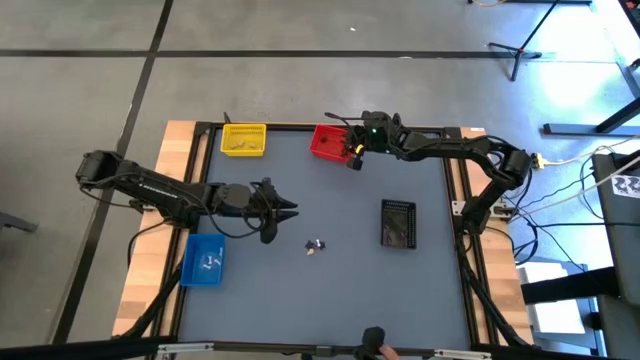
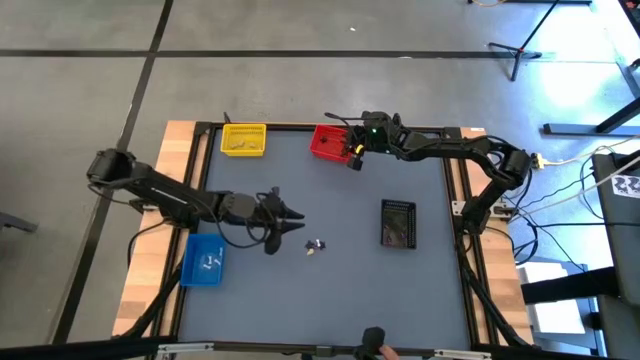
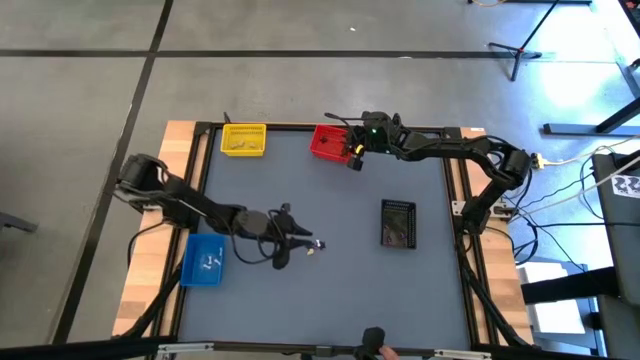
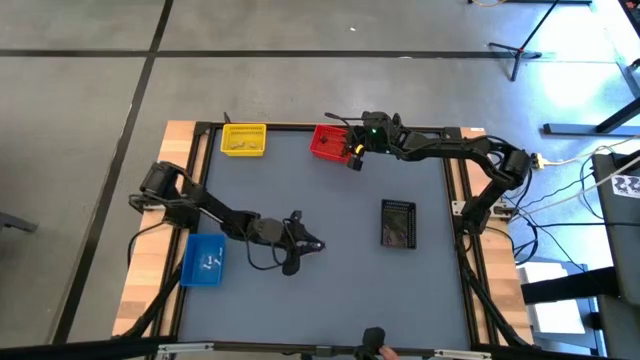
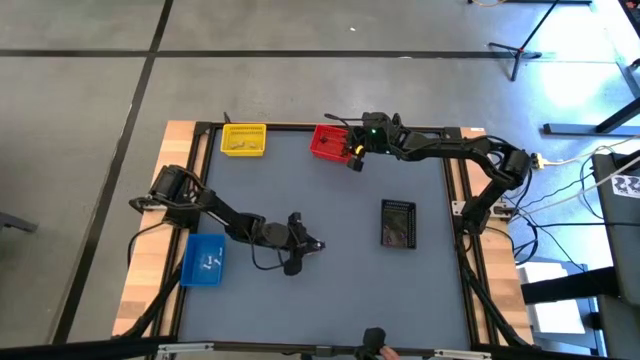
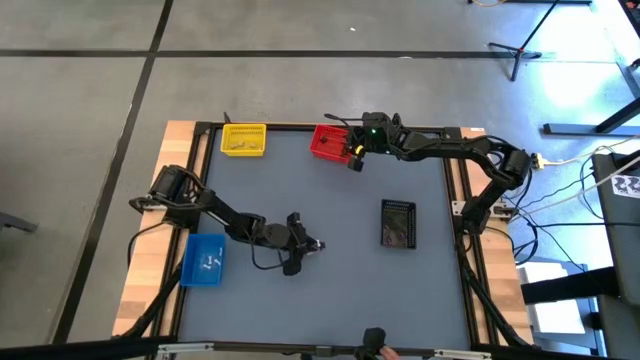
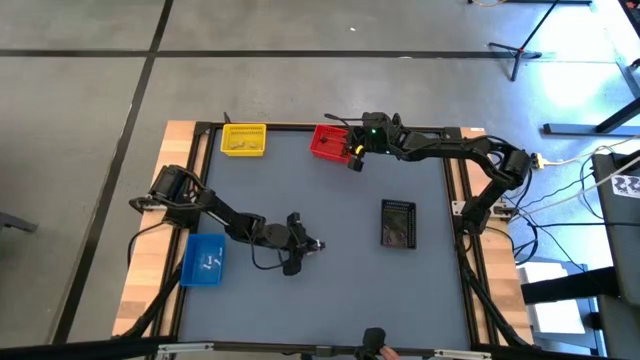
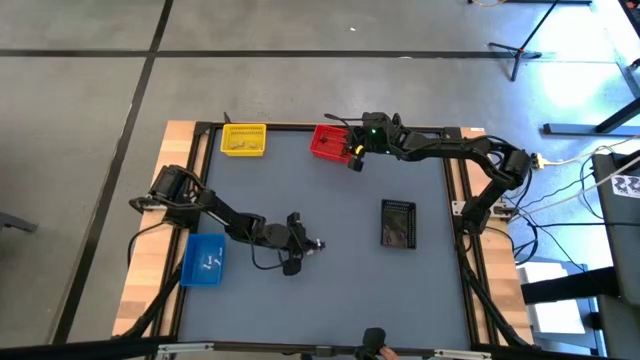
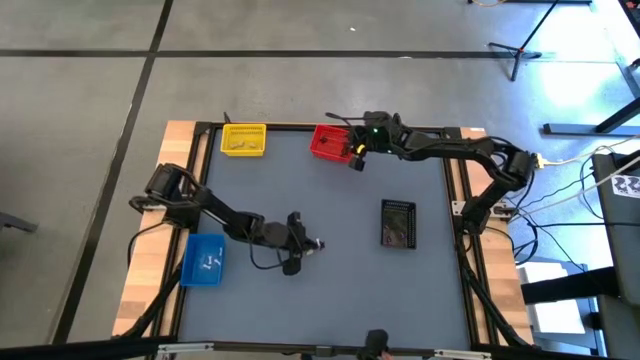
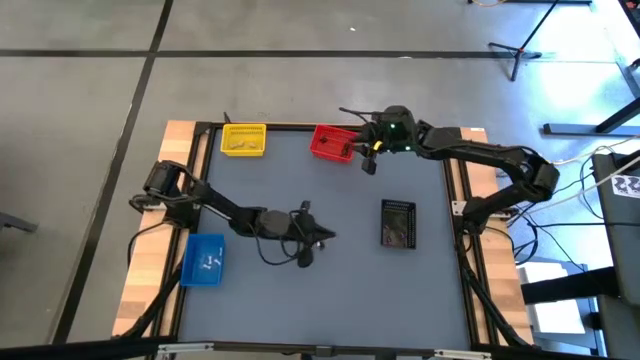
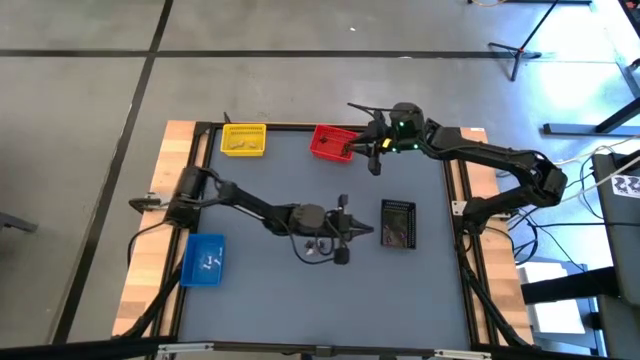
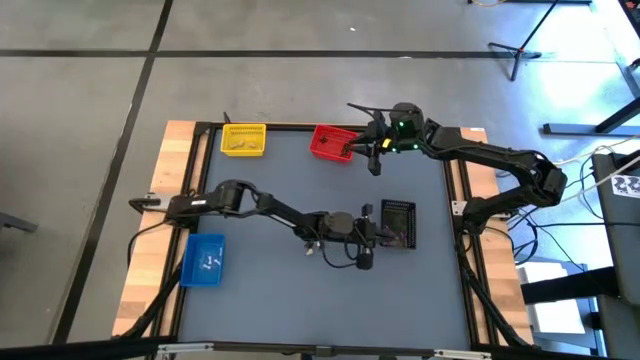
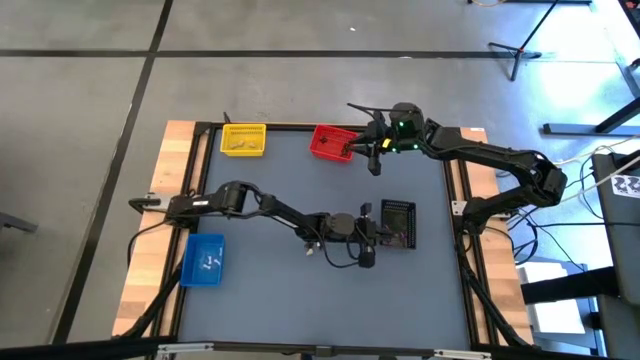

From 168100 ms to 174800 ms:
Task: Sort Halloween decoration
Put the purple hat toy into the black bin

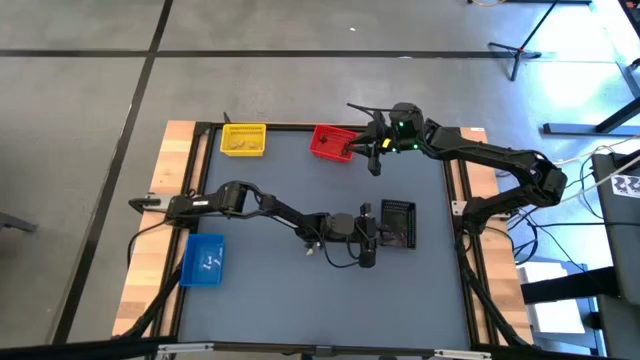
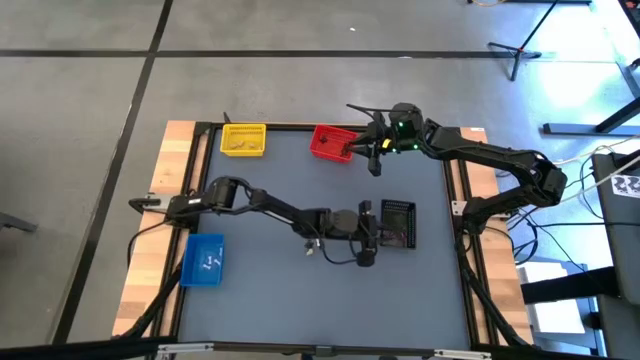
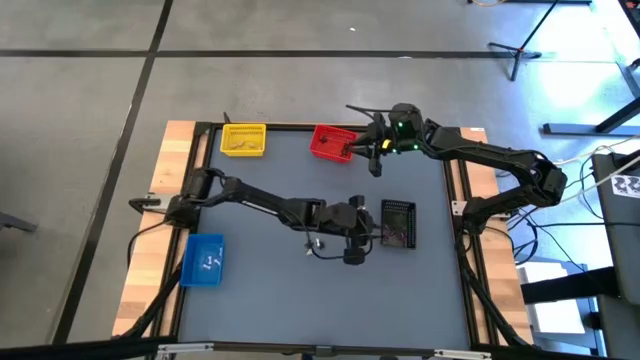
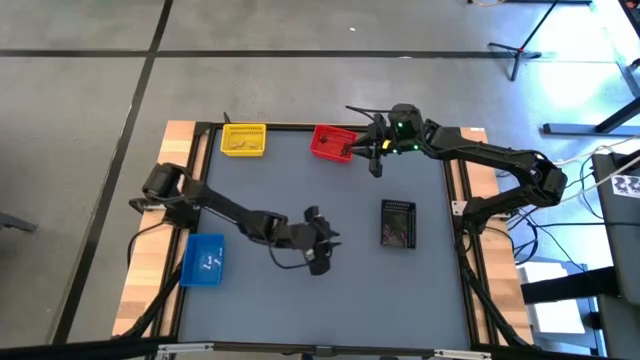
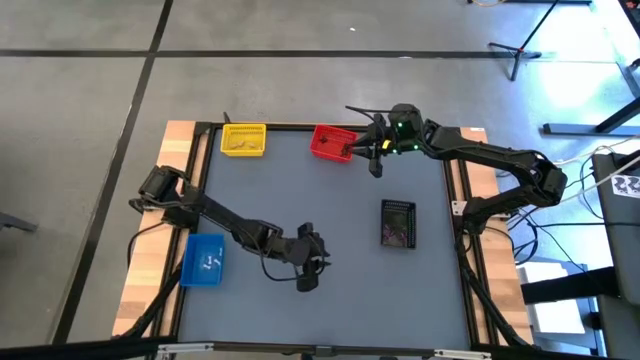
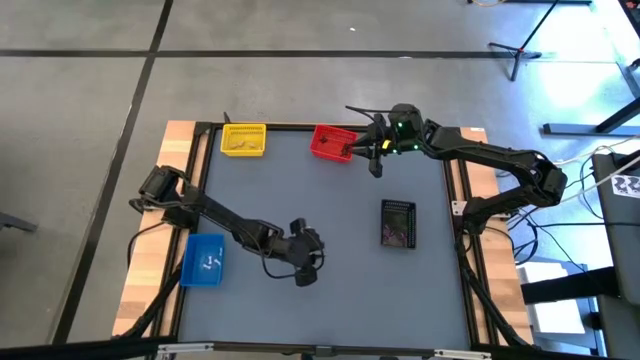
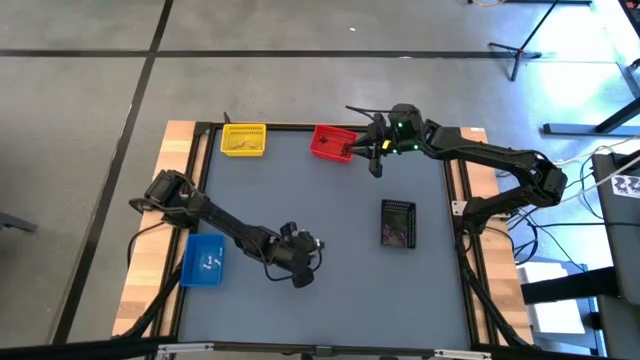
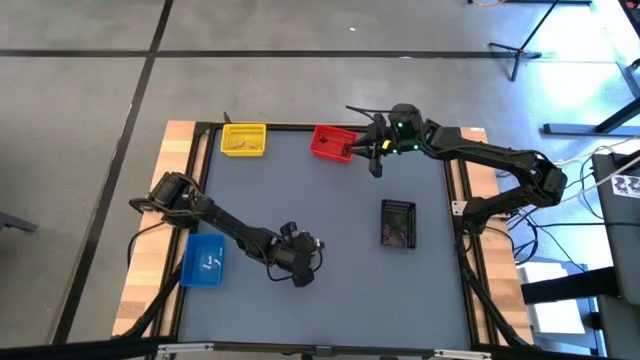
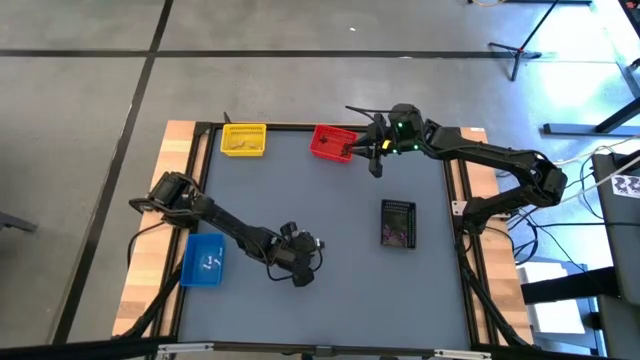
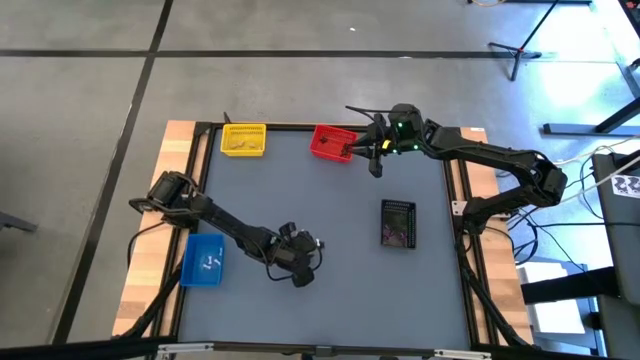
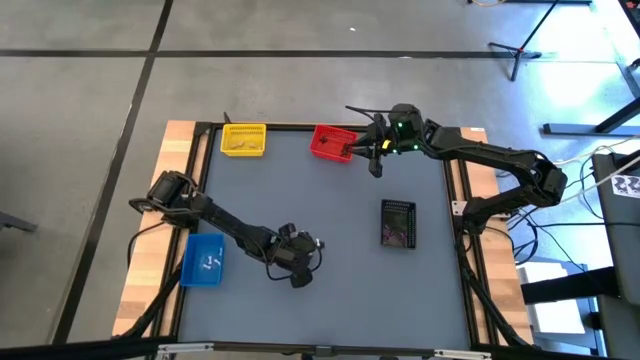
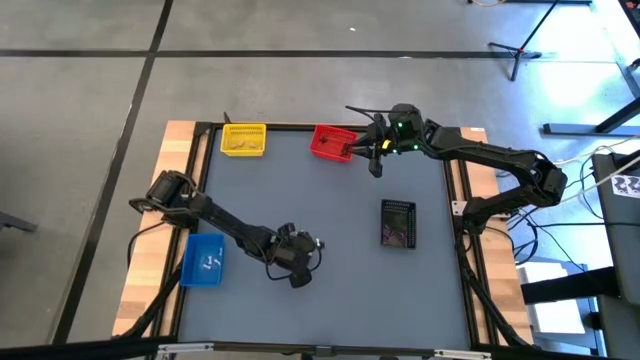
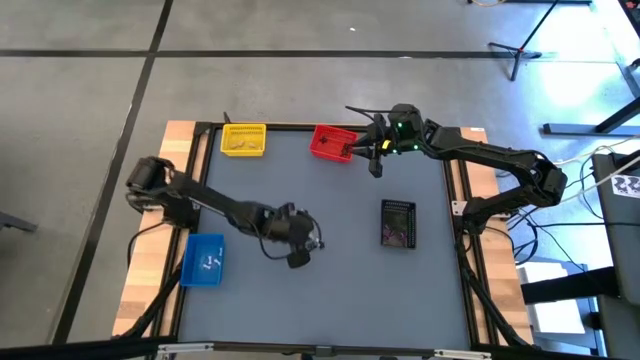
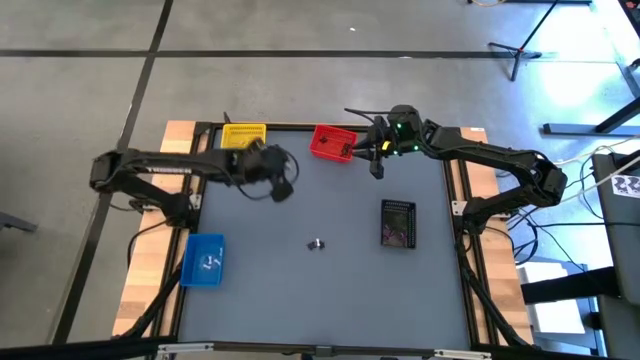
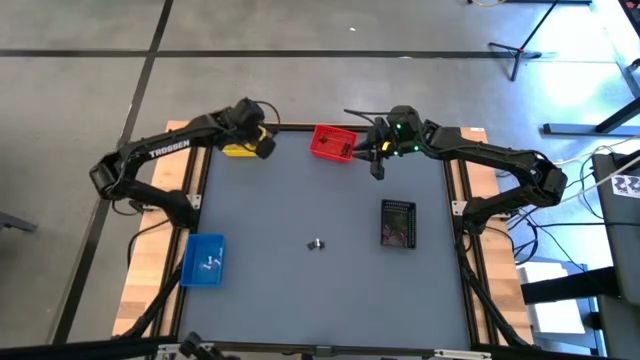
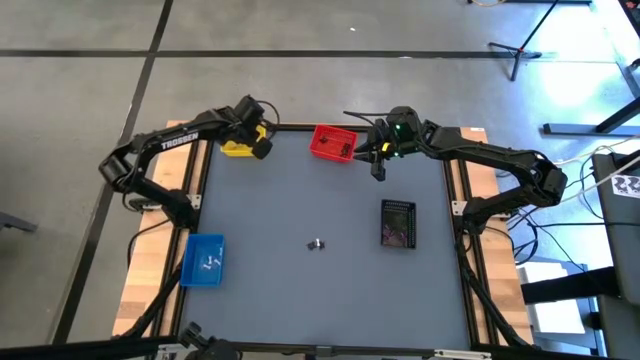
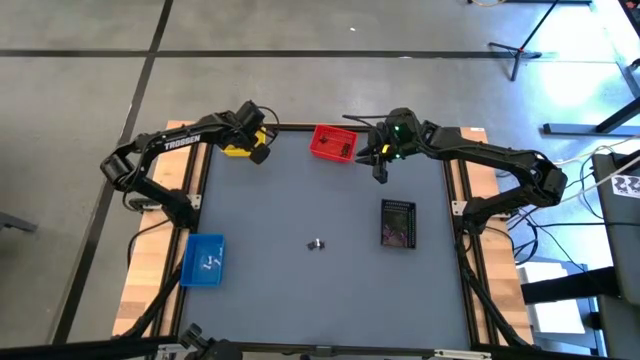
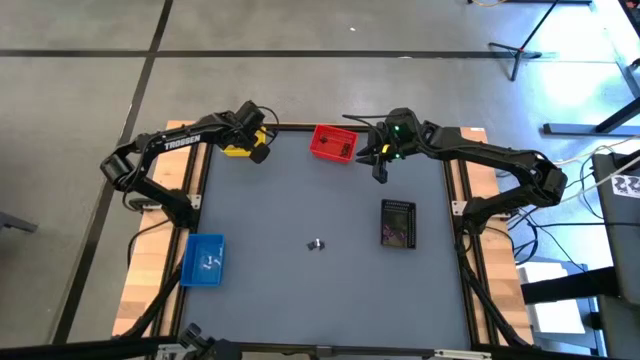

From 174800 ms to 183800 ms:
Put the yellow skull toy into the yellow bin

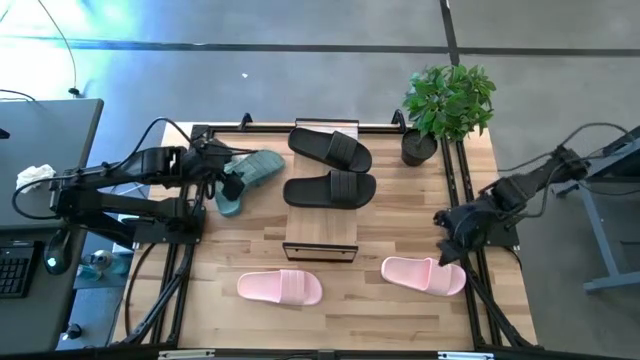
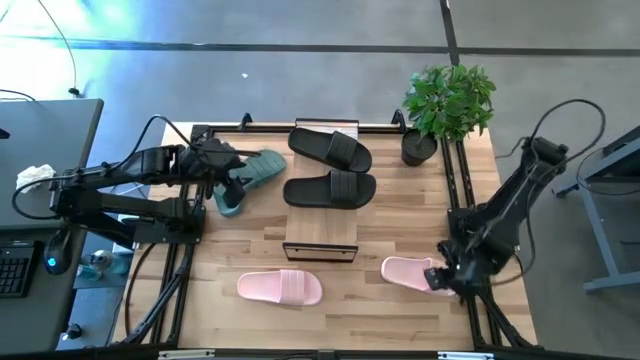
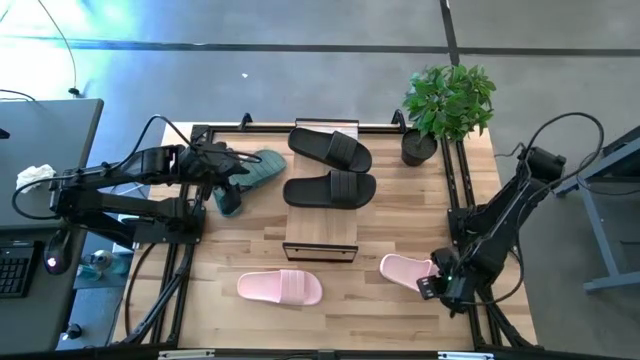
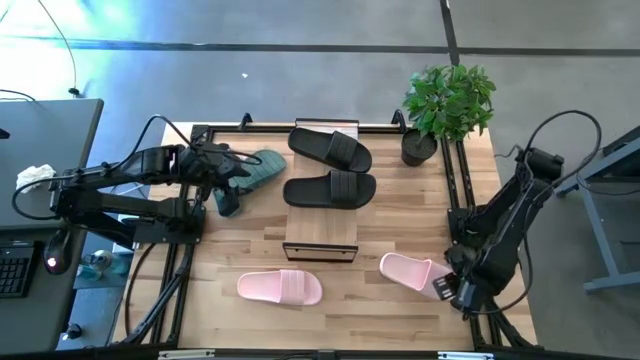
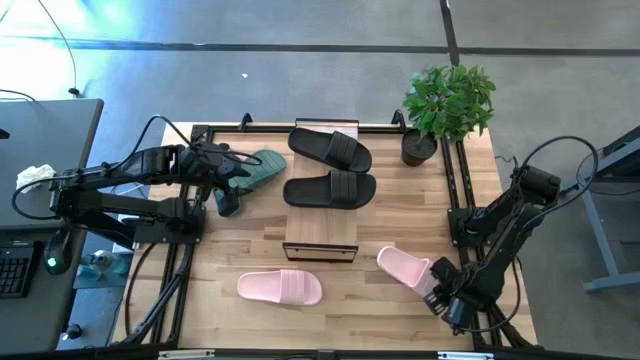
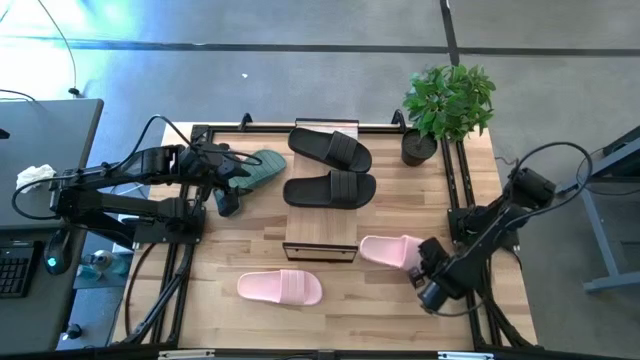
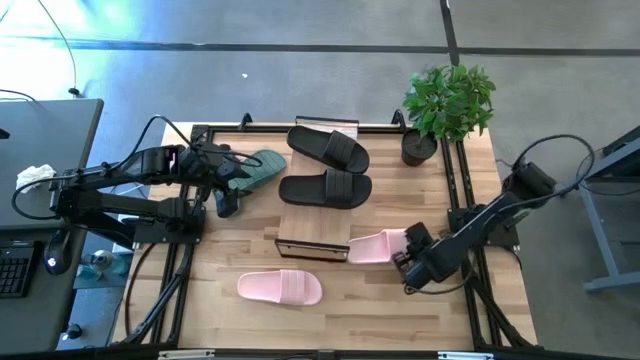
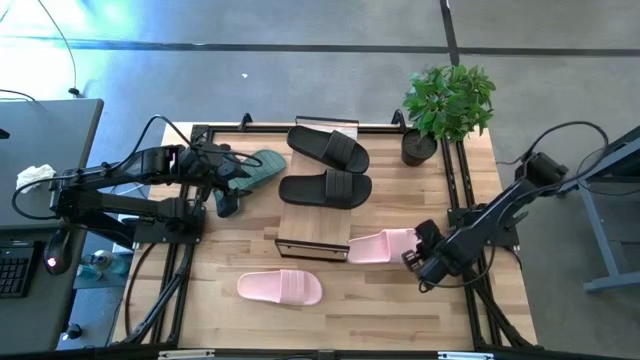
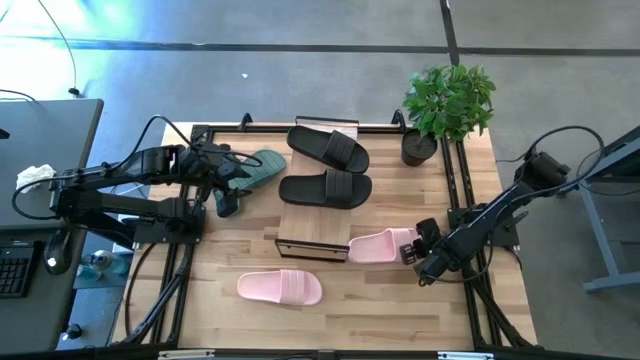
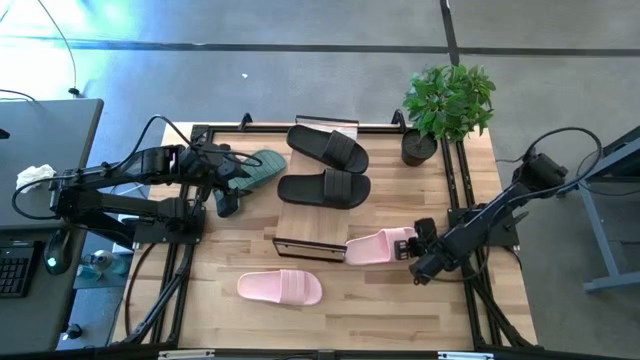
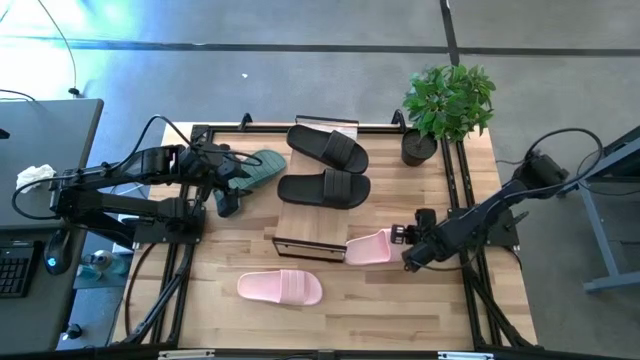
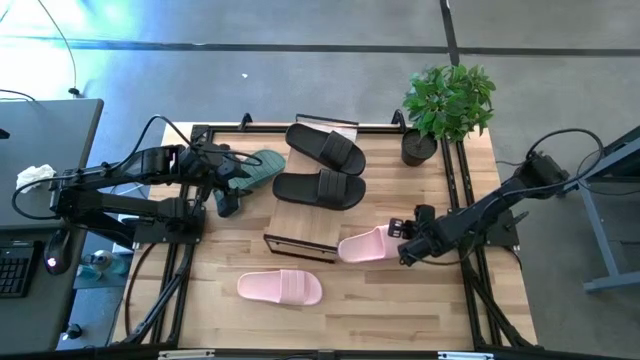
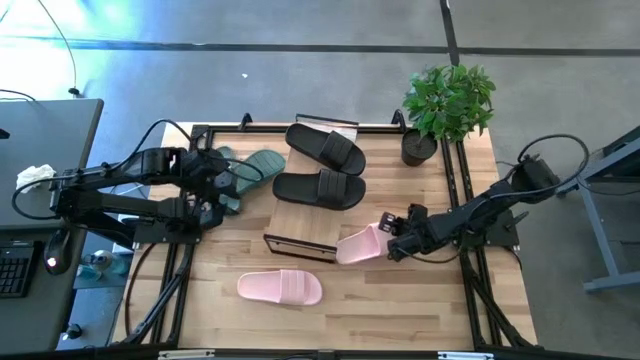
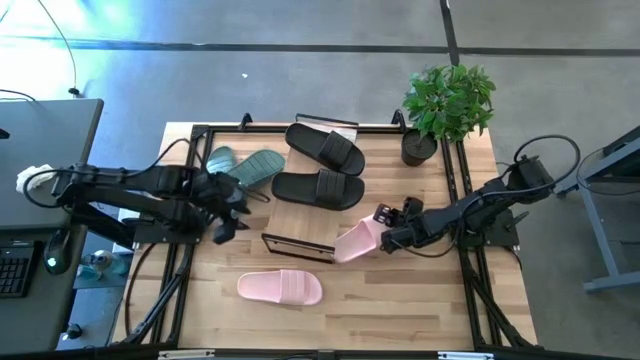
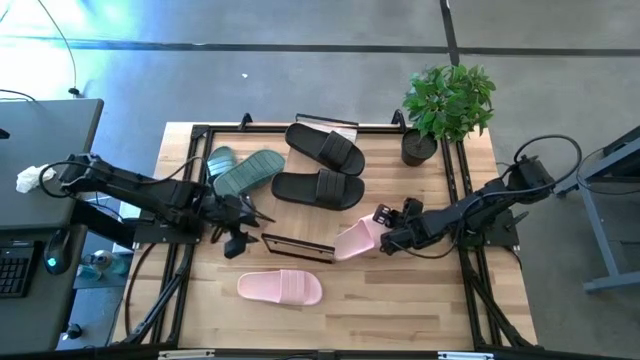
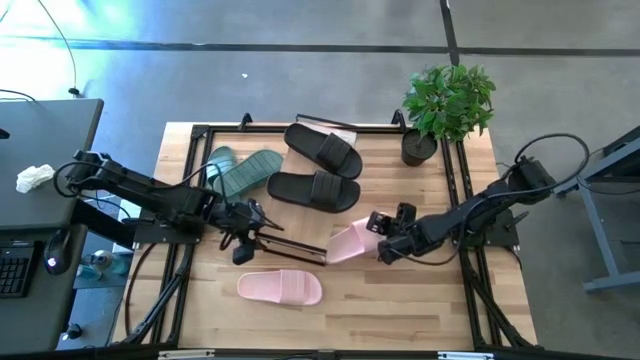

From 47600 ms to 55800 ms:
Task: Pick and place slides into the shelf
Put the right pink slide under the shelf
